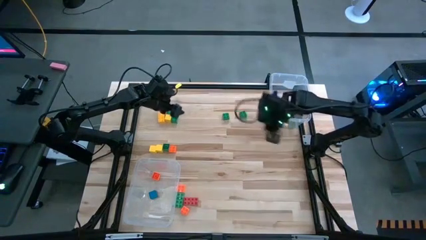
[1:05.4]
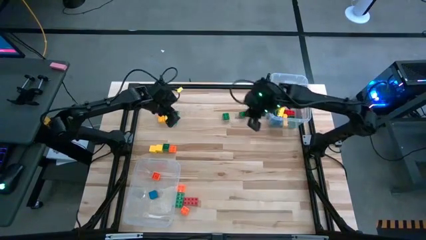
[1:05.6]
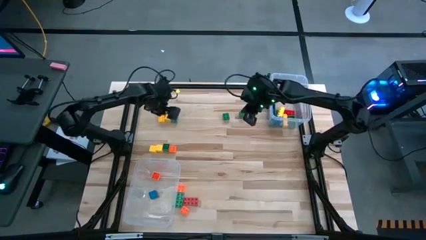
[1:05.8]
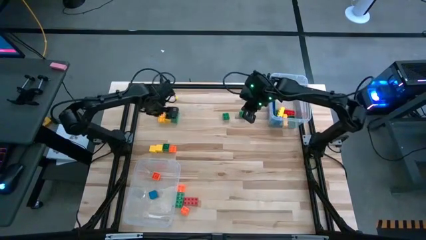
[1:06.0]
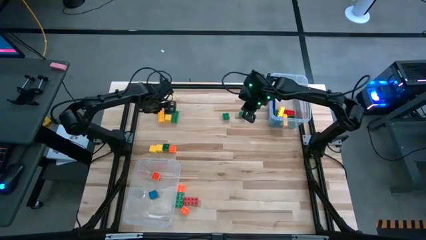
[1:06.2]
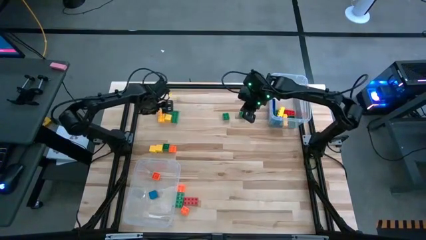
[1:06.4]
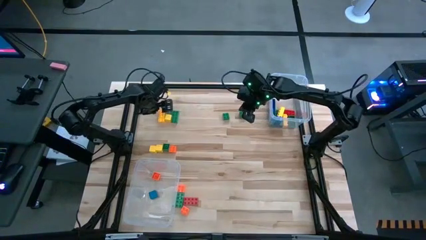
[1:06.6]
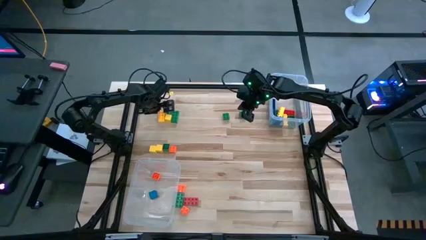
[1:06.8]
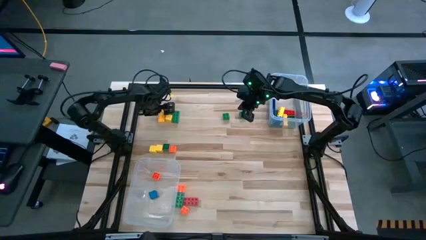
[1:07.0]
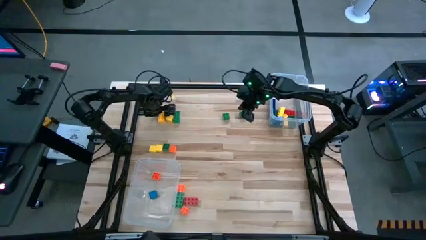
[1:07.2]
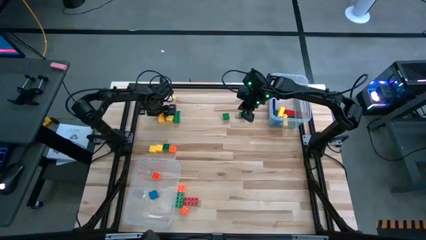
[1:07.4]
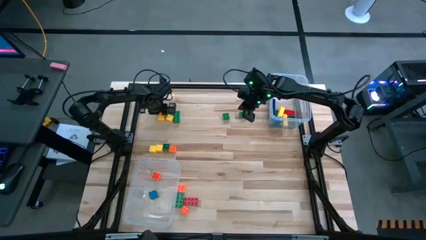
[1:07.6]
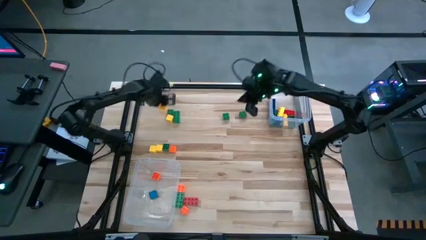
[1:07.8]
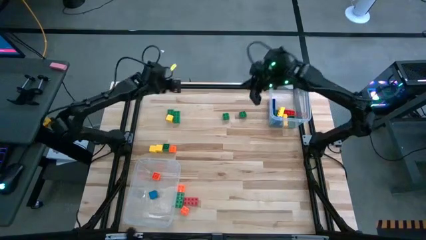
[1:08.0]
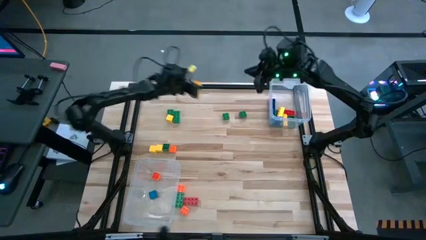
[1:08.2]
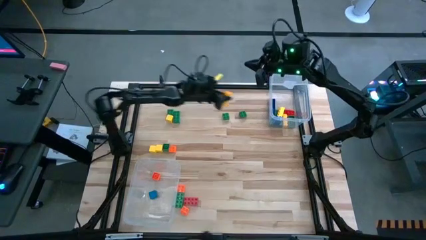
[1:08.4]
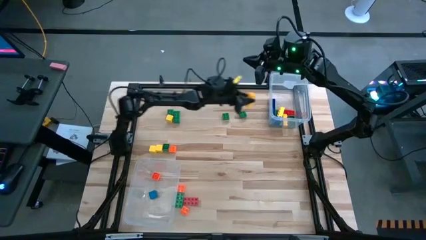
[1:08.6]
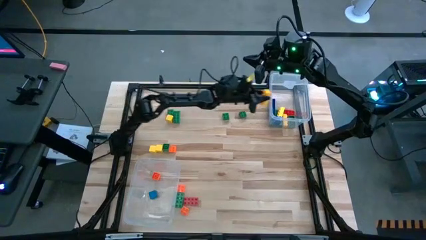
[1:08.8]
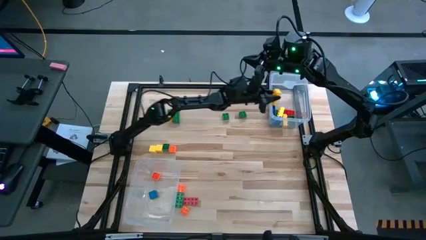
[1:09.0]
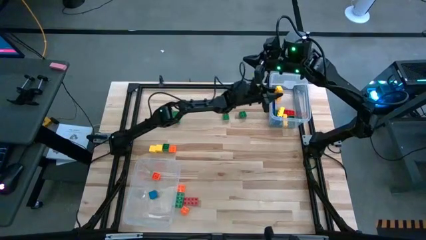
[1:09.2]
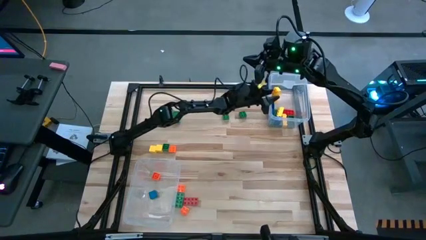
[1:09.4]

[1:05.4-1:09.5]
Task: Sort blocks by size
Put the large yellow game piece into the right transparent bin

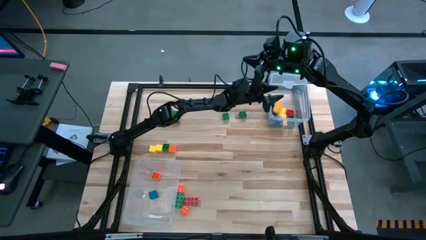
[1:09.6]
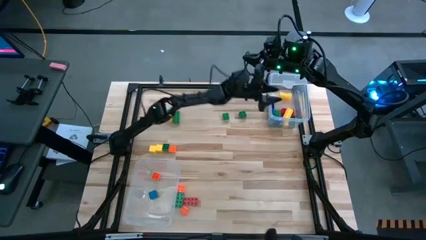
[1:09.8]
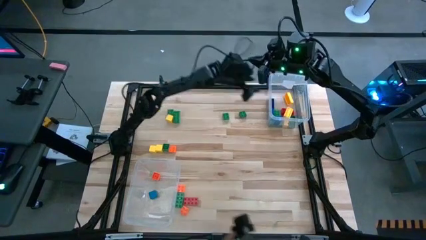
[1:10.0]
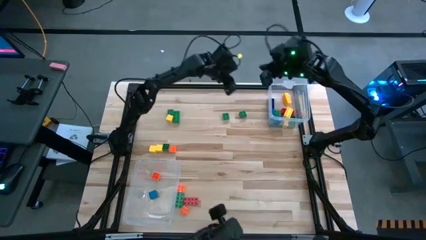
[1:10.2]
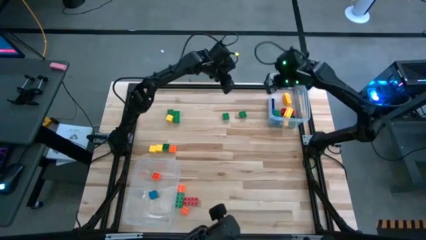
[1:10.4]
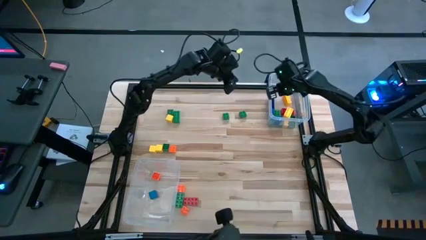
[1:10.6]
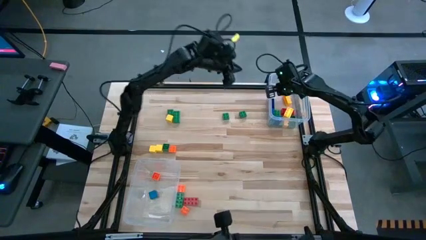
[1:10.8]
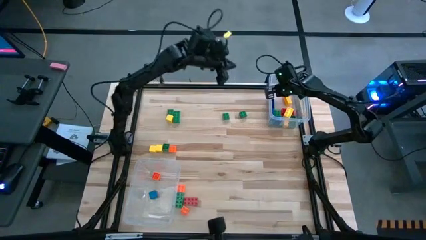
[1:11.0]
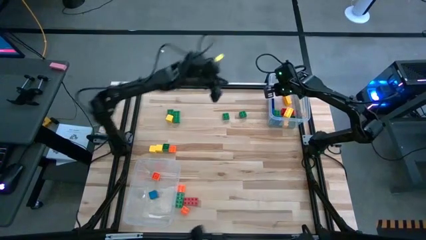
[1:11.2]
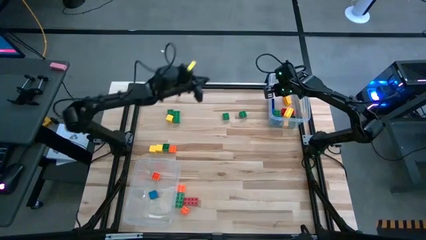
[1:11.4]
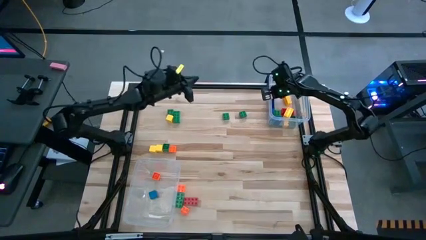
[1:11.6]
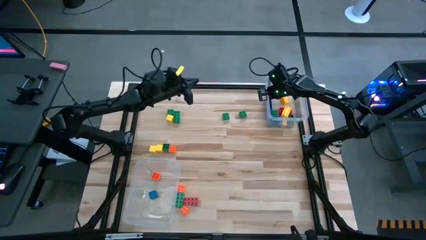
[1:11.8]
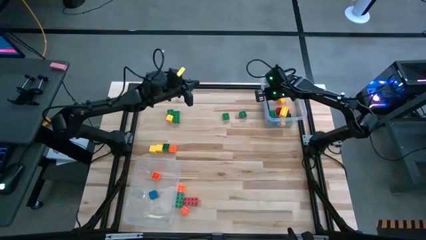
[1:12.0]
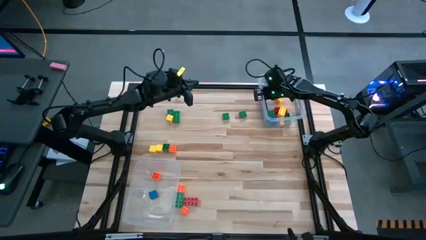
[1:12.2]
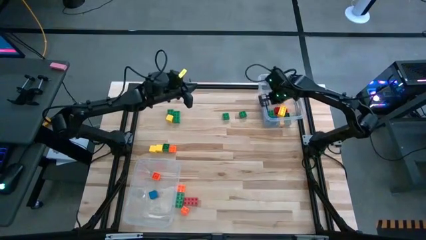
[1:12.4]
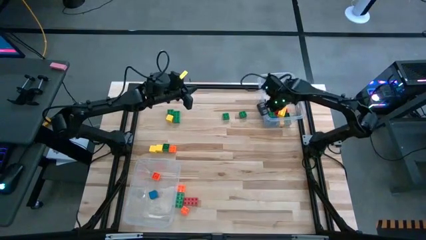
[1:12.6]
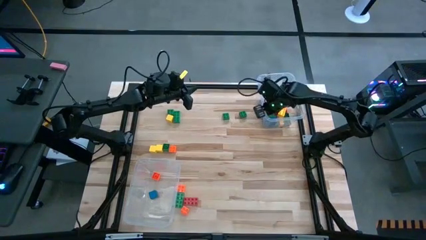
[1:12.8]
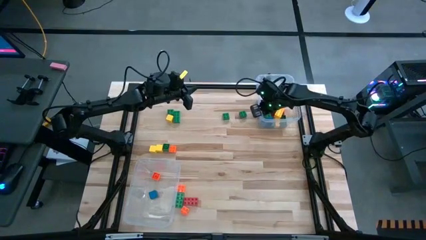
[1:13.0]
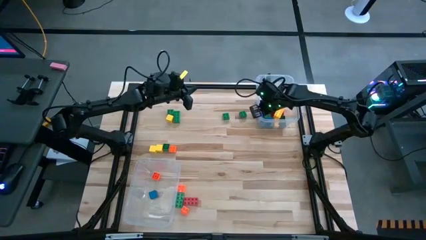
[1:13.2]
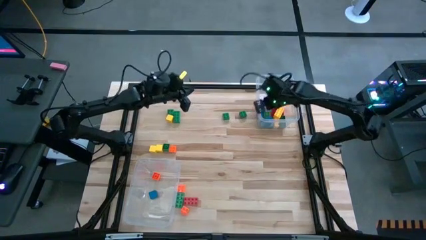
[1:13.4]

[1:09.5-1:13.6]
Adjust the right transparent bin

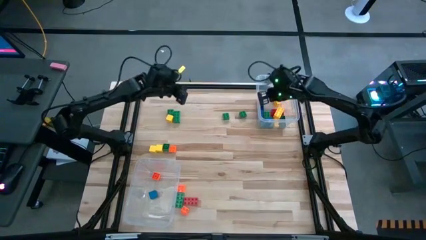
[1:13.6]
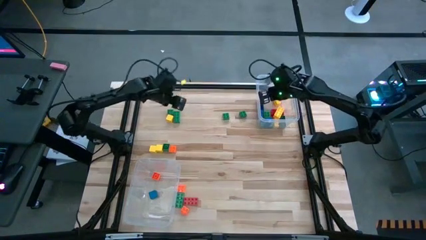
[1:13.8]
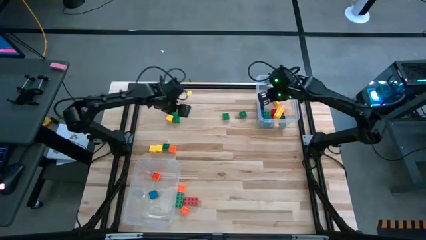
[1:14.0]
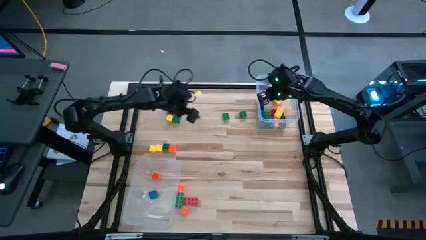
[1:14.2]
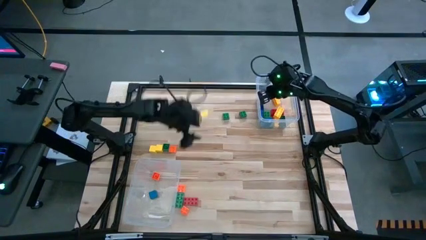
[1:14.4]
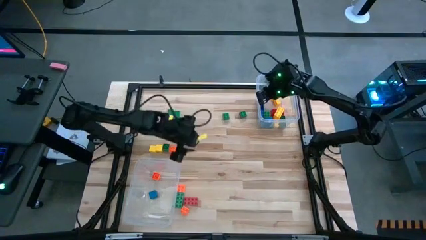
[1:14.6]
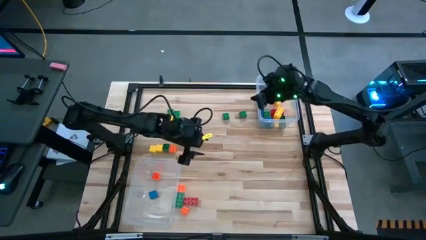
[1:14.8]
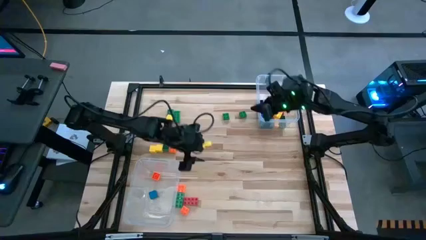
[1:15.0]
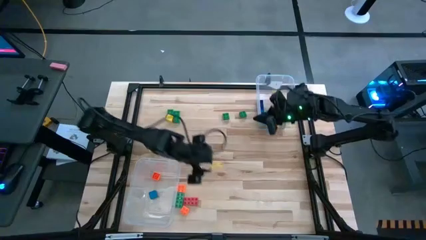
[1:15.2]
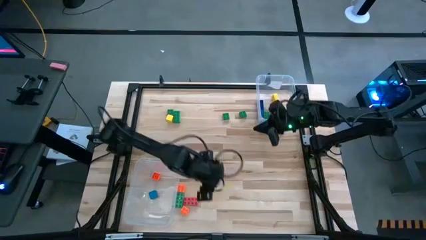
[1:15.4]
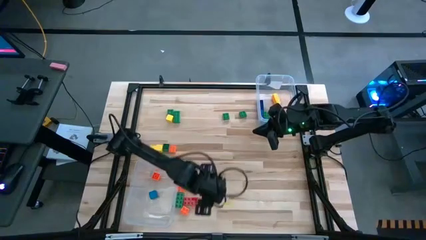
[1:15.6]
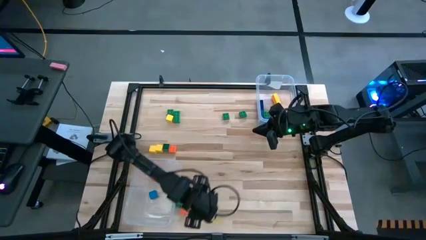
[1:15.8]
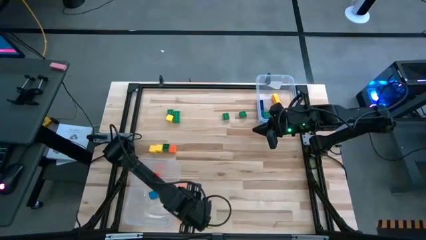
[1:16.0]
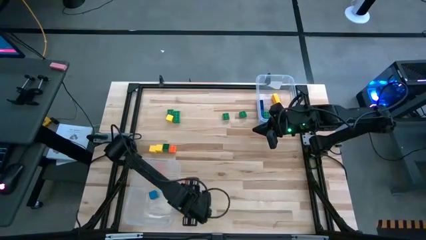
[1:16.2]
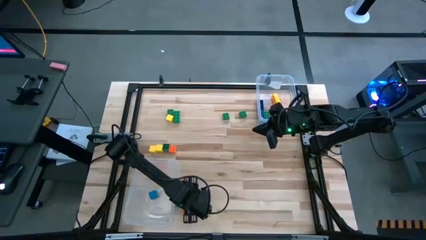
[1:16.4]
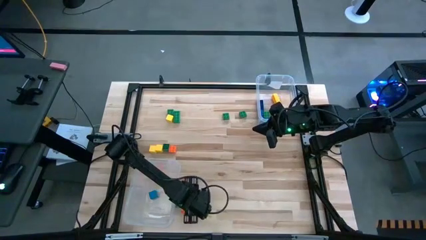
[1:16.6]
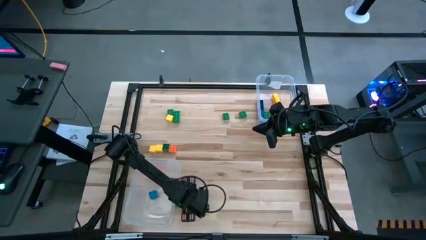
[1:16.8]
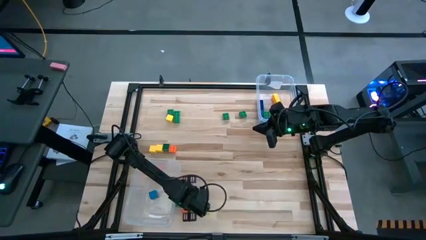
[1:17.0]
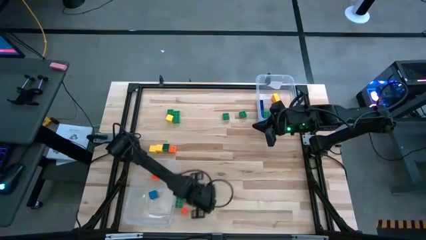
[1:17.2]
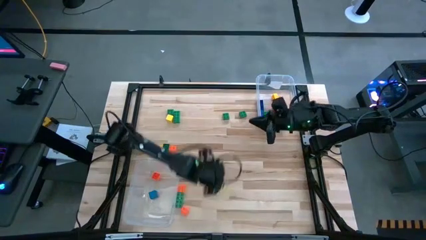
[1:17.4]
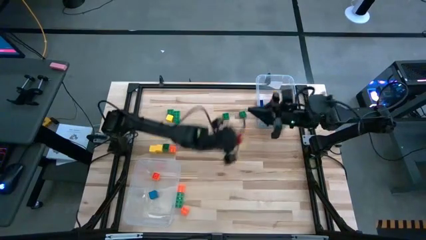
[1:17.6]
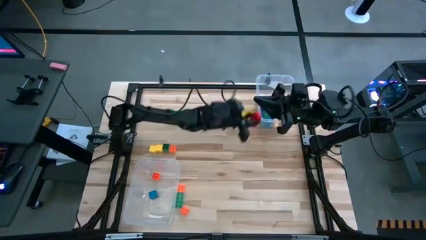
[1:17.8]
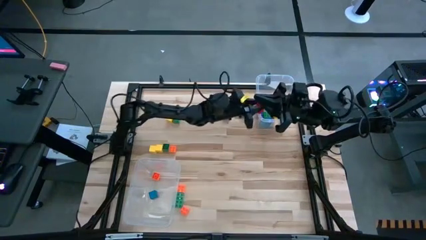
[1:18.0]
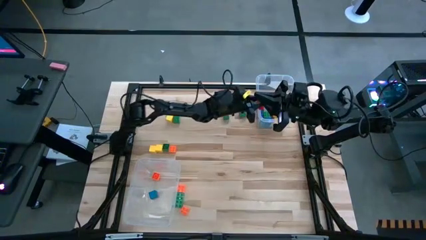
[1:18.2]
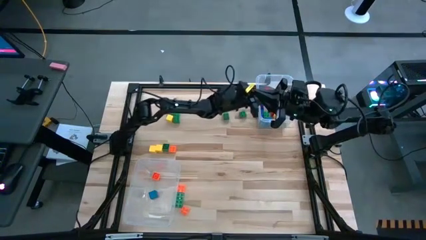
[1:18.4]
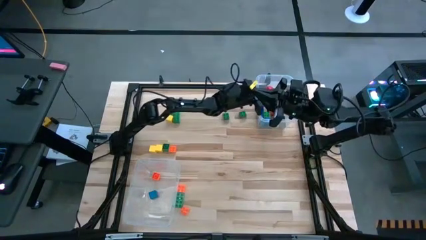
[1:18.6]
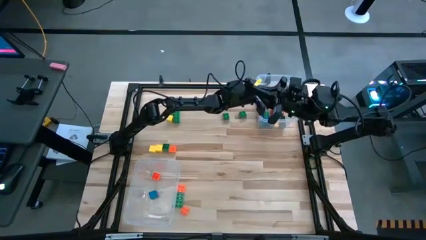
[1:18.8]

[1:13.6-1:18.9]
Put the large red game piece into the right transparent bin

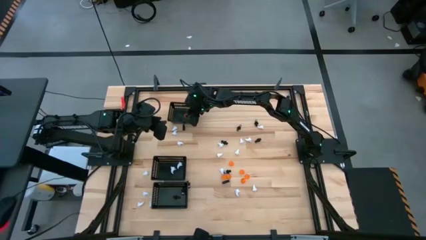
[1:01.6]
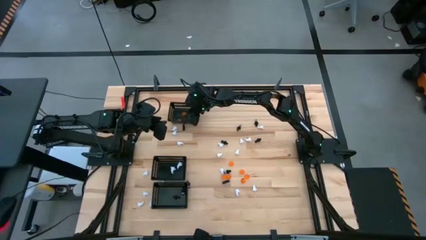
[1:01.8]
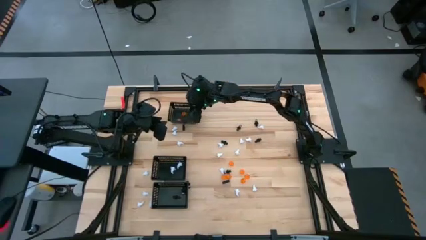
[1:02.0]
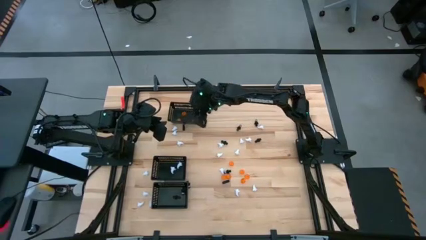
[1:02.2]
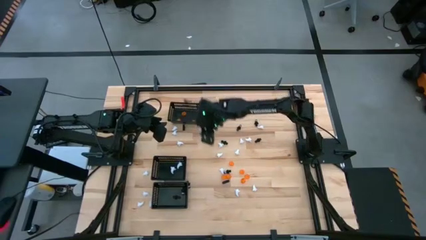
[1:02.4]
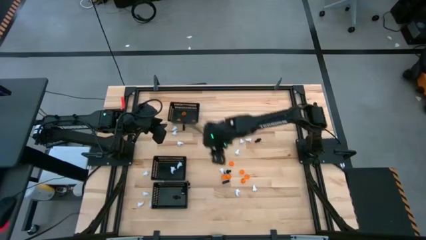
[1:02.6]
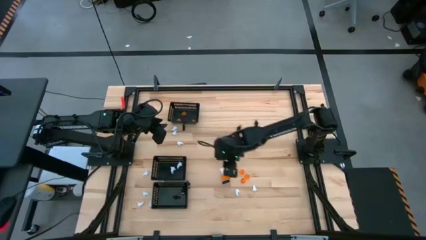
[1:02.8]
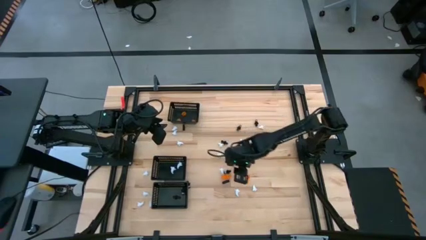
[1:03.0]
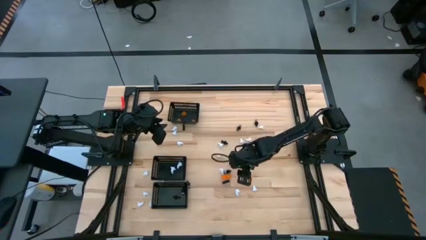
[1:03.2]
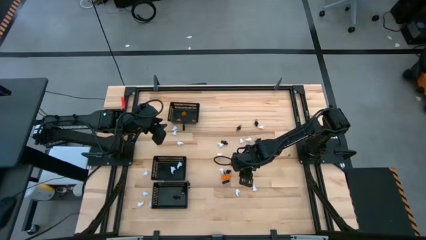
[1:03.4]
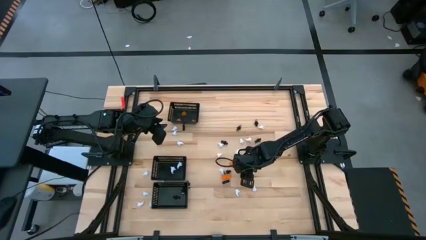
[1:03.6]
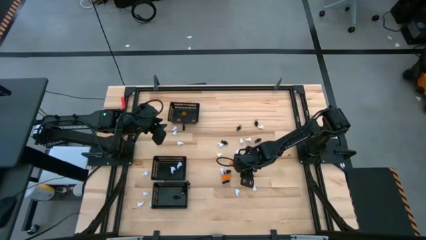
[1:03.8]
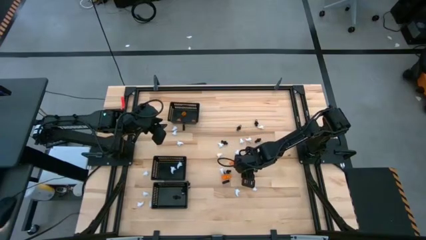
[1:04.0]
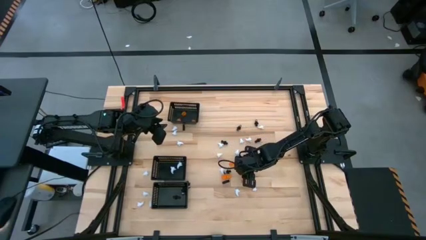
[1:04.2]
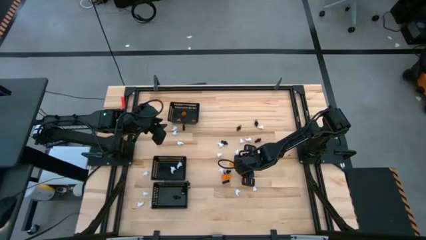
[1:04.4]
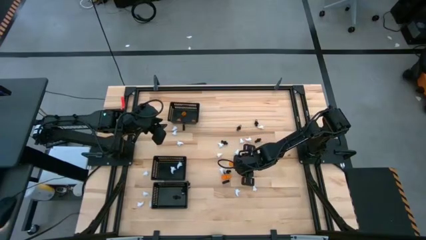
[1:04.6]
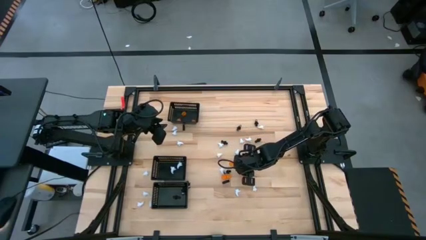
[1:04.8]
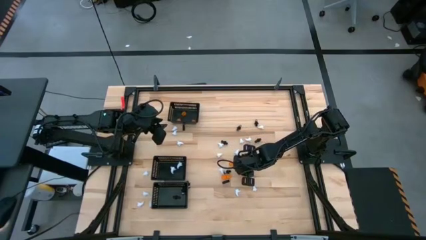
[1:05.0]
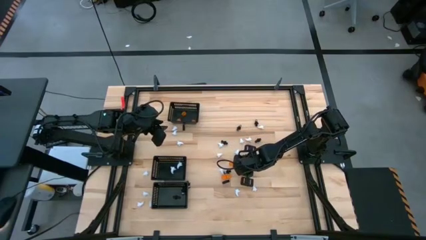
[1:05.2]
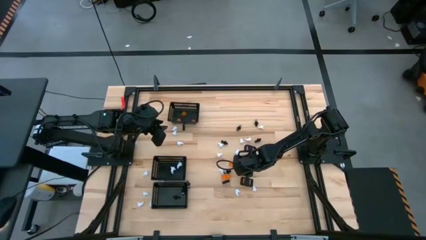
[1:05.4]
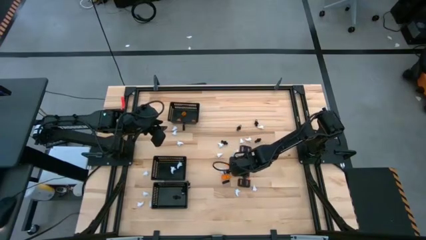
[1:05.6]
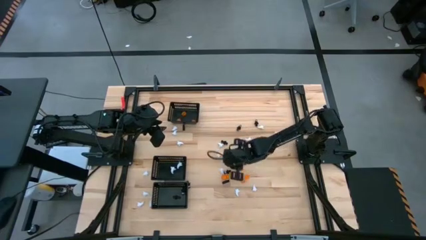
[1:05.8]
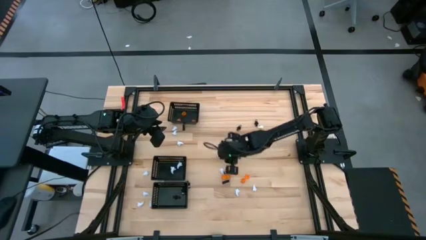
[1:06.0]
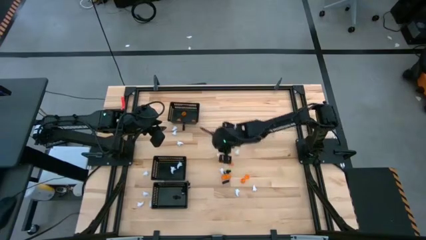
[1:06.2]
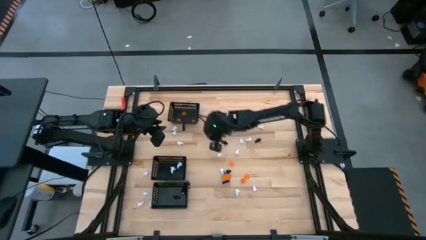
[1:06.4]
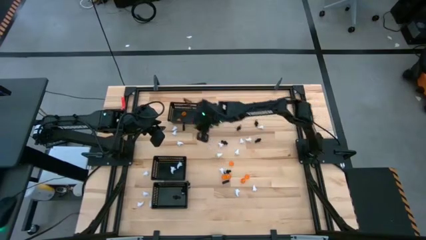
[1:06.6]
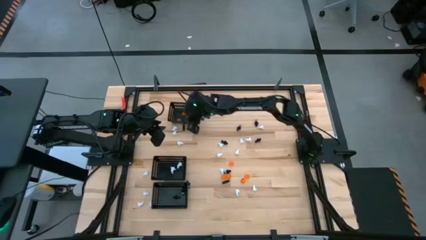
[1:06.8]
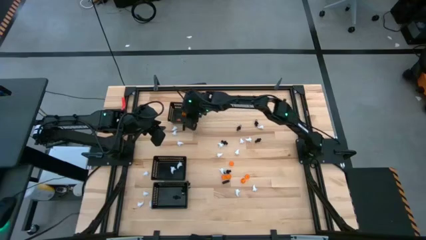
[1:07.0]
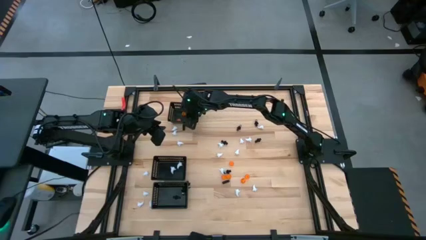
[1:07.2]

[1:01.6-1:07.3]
Task: Sort Halloween decoration
Put the orange pumpkin toy into the top black bin
